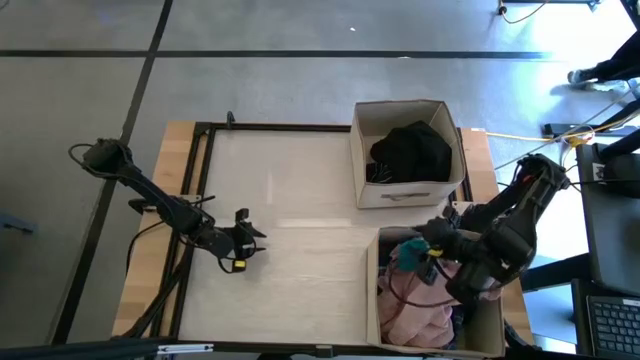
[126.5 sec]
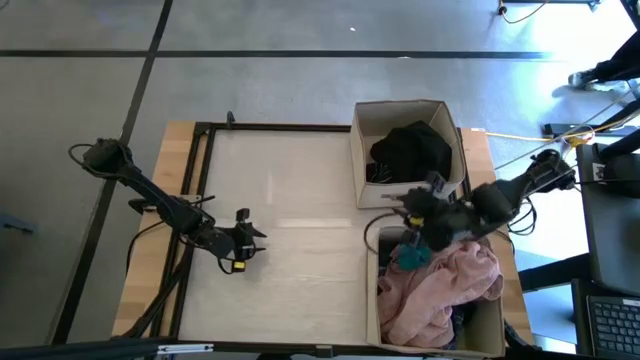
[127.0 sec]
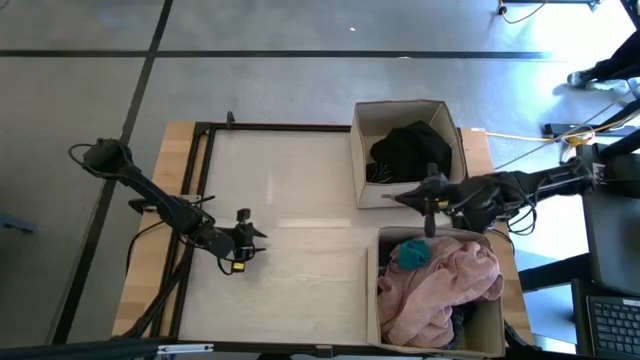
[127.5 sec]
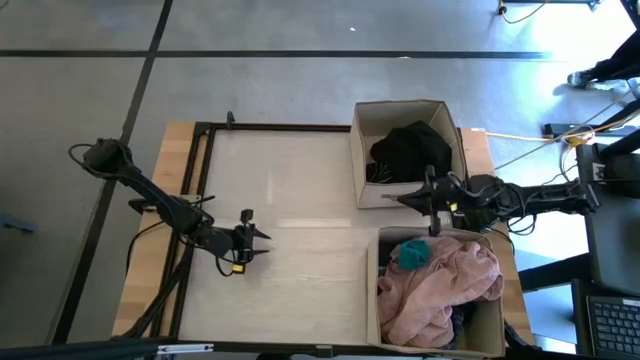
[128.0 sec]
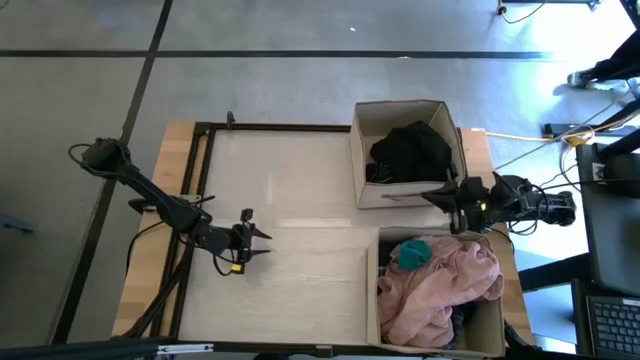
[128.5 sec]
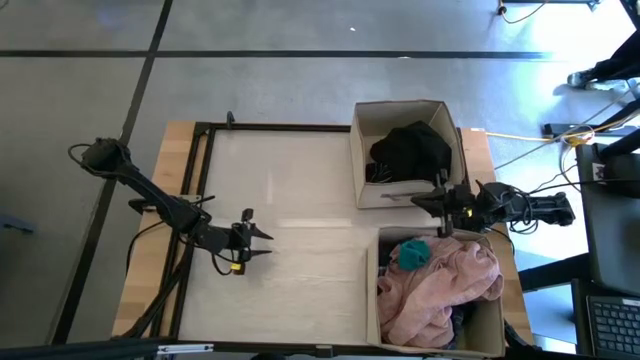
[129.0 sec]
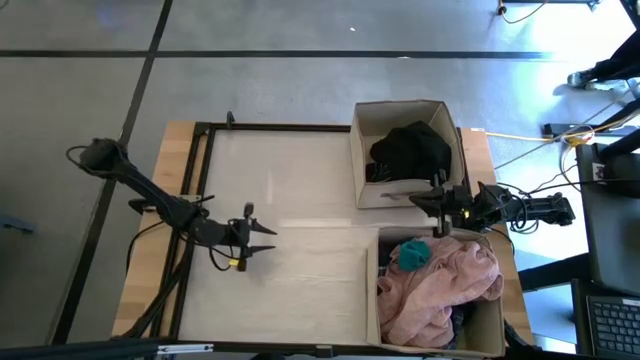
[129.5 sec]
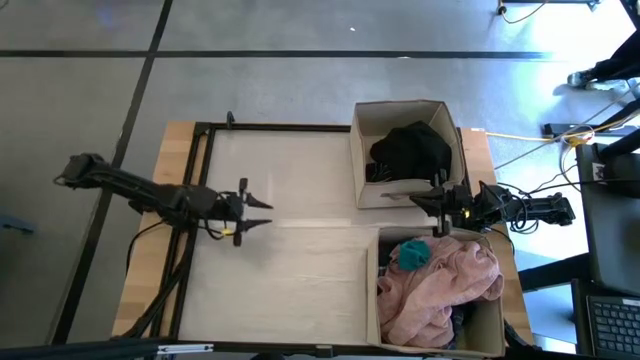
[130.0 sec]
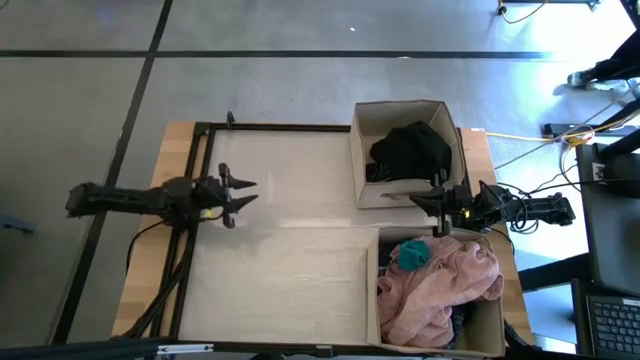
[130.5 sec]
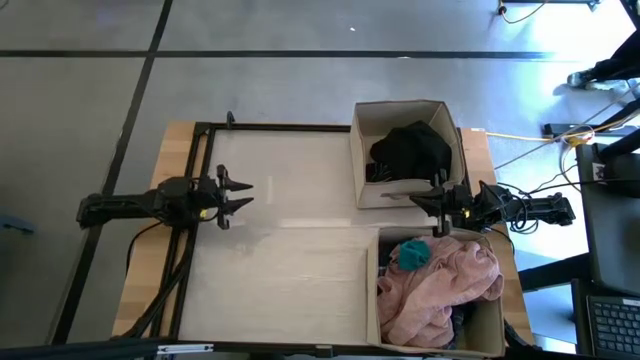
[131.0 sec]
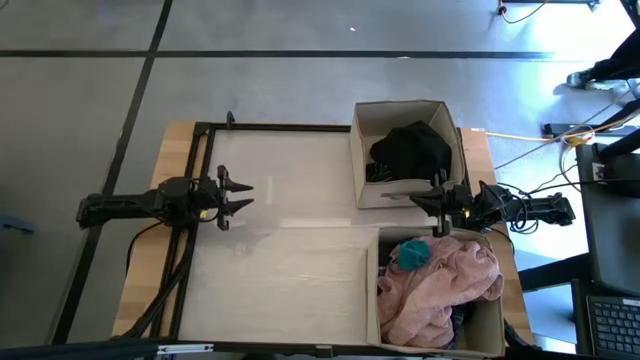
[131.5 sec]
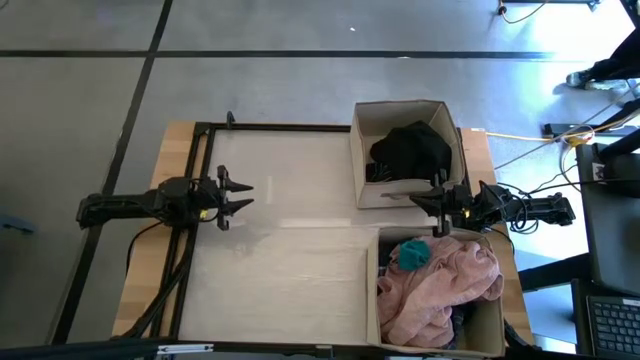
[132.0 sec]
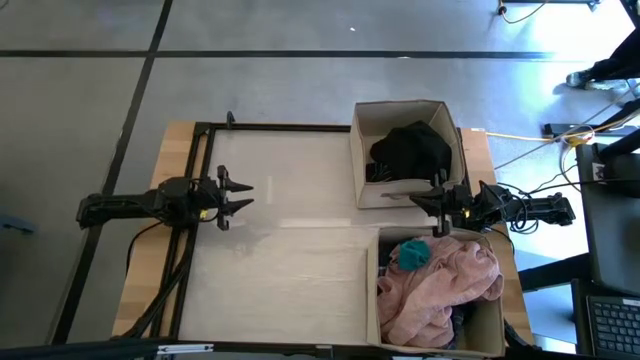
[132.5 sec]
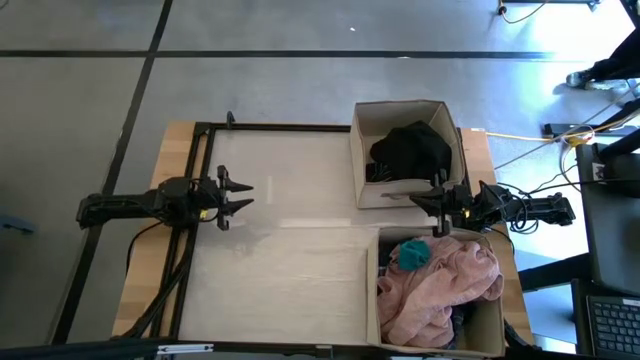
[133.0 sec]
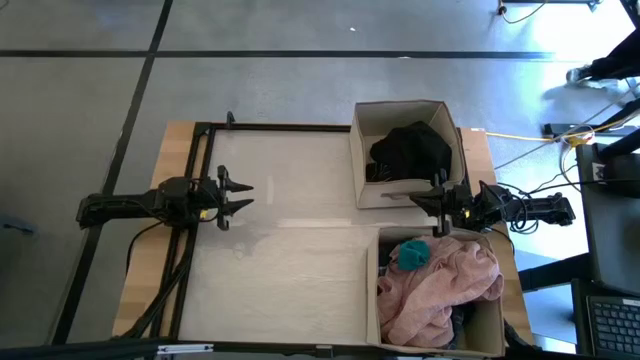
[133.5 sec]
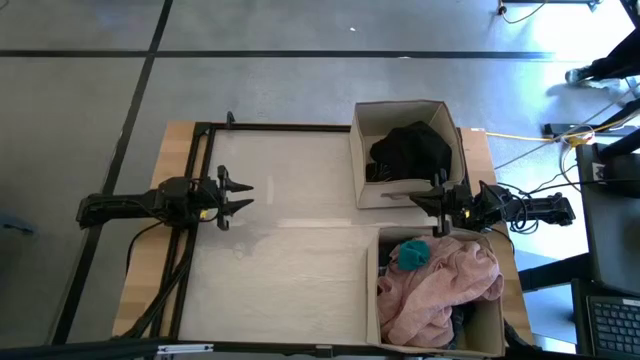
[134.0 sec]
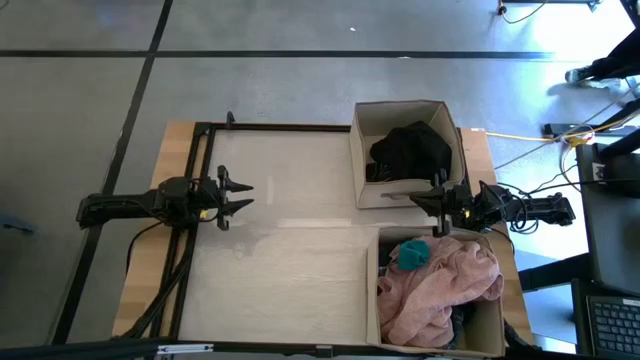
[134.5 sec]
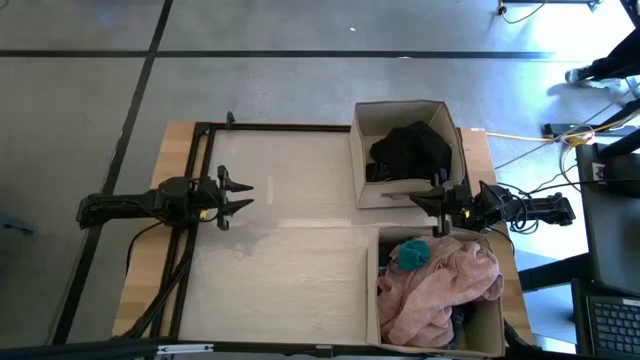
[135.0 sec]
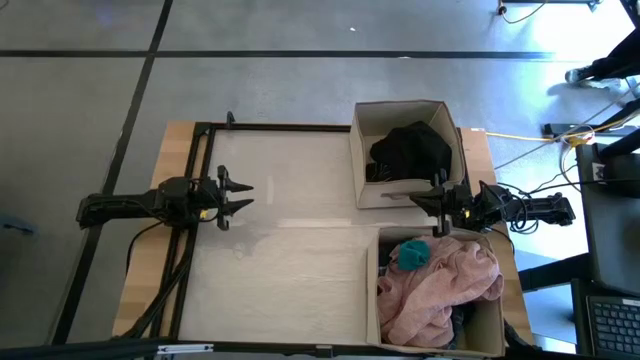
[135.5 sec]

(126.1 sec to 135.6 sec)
Task: Sort clothes
Return to Home Position

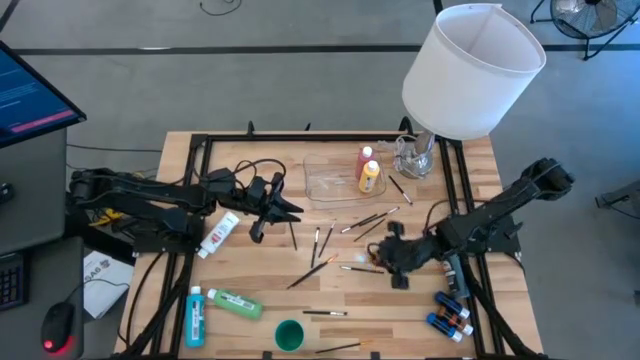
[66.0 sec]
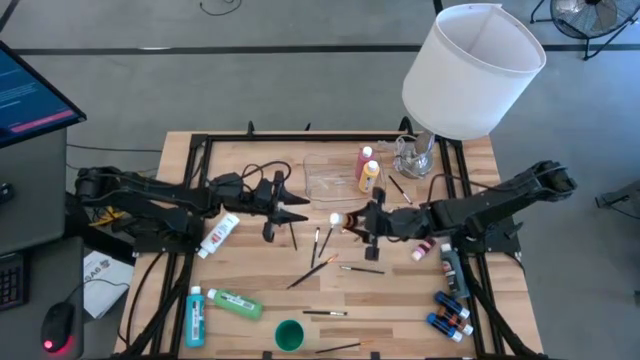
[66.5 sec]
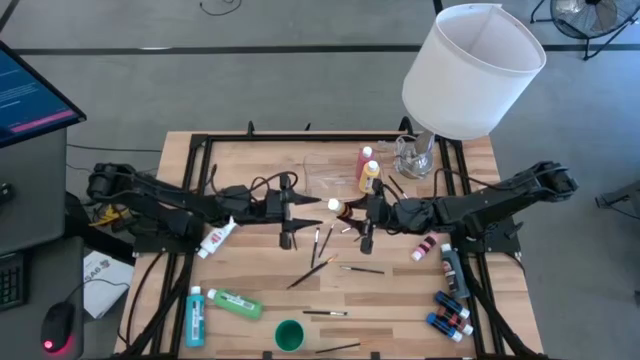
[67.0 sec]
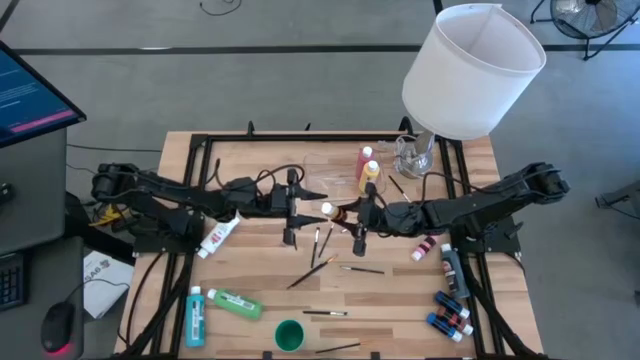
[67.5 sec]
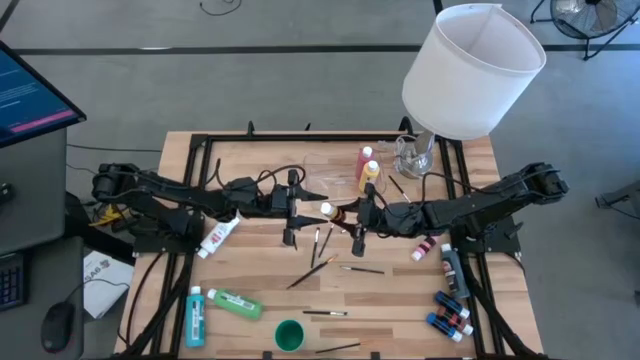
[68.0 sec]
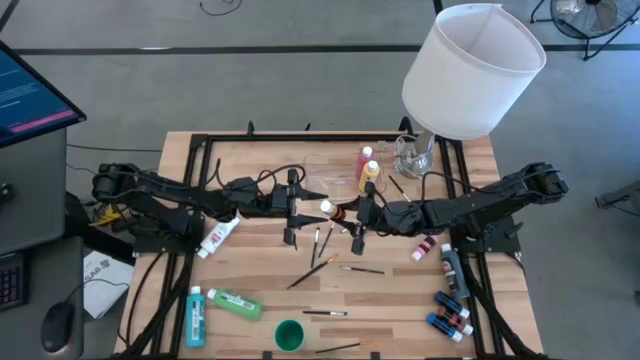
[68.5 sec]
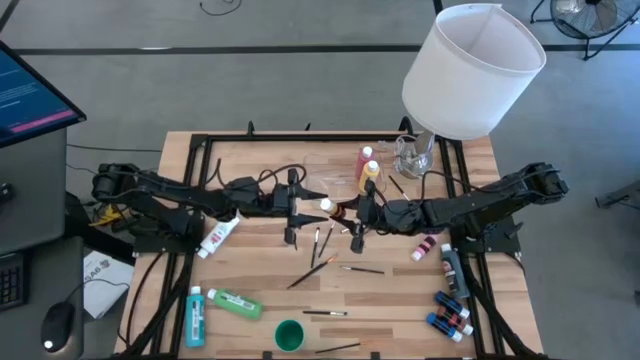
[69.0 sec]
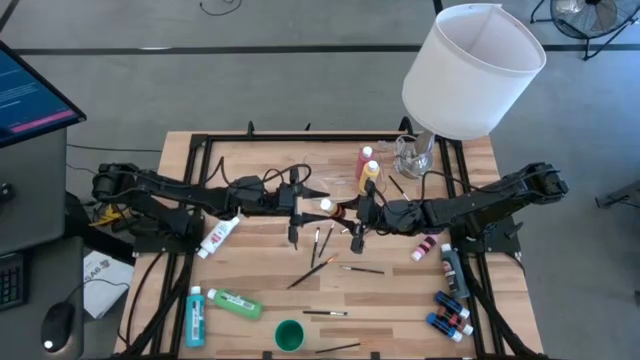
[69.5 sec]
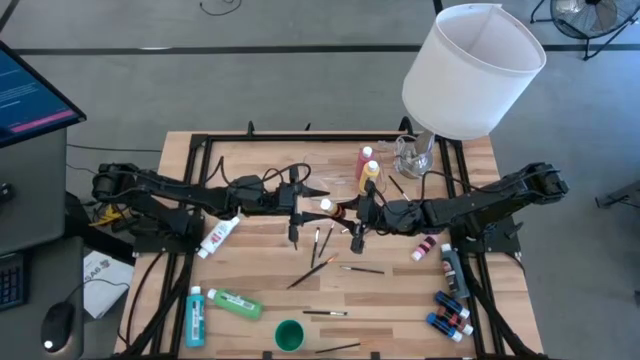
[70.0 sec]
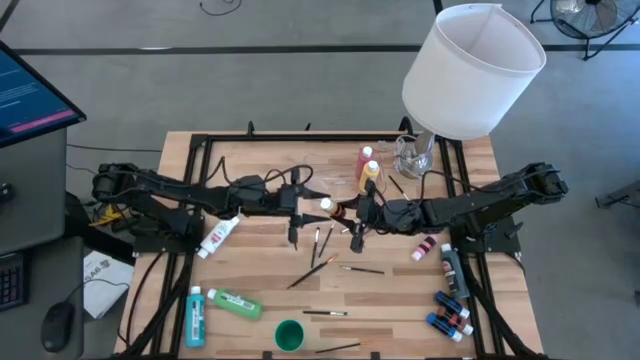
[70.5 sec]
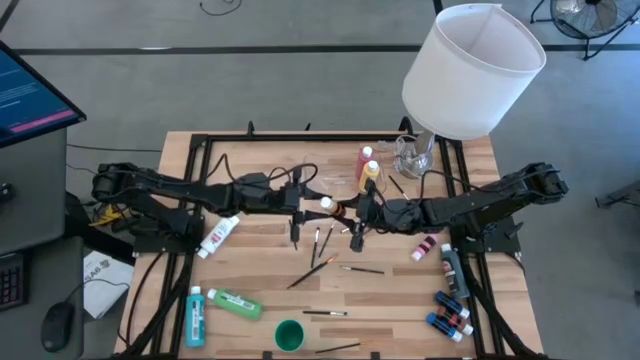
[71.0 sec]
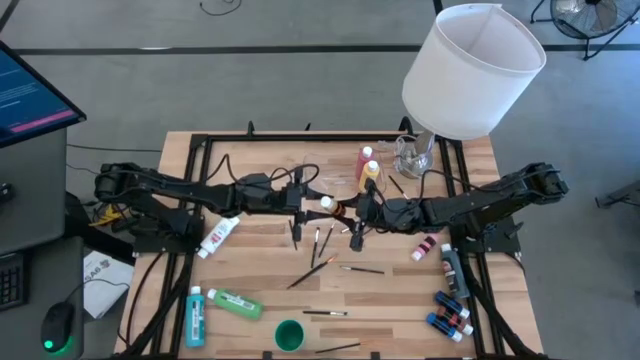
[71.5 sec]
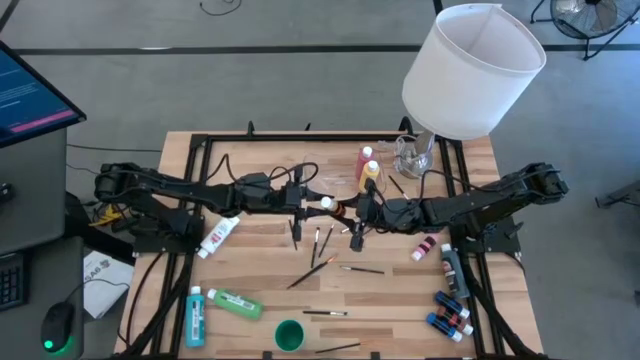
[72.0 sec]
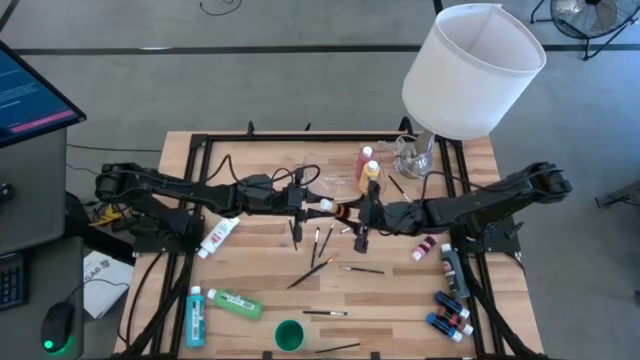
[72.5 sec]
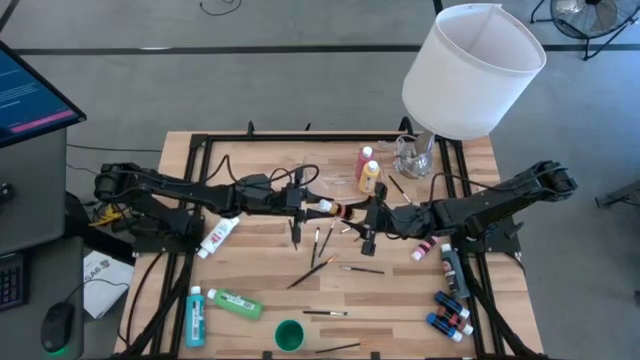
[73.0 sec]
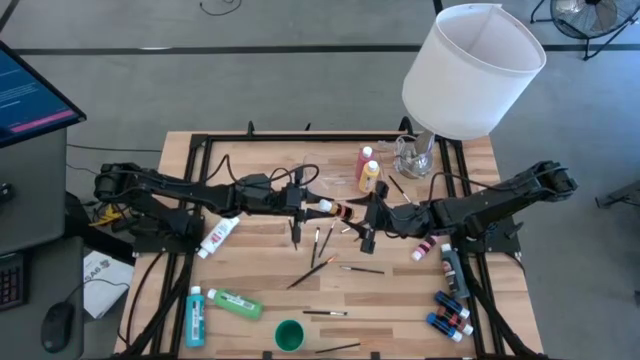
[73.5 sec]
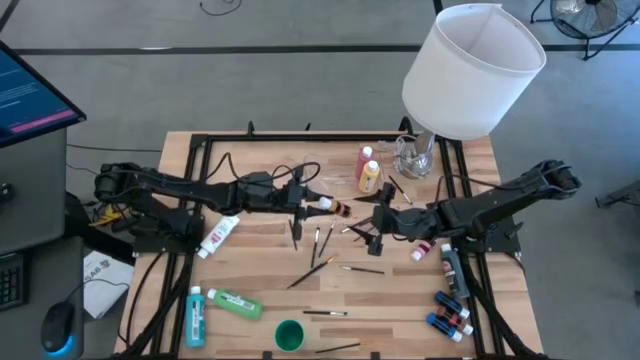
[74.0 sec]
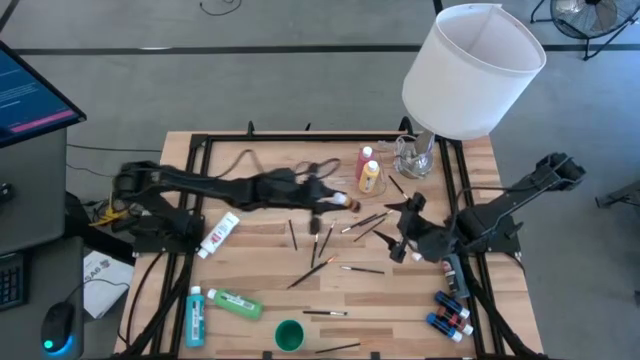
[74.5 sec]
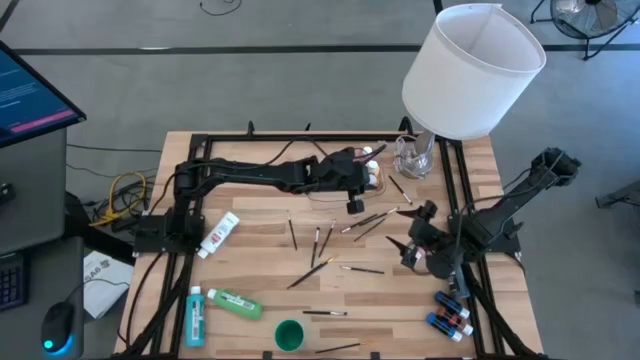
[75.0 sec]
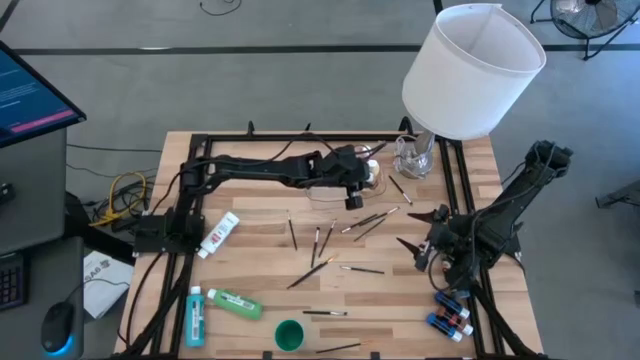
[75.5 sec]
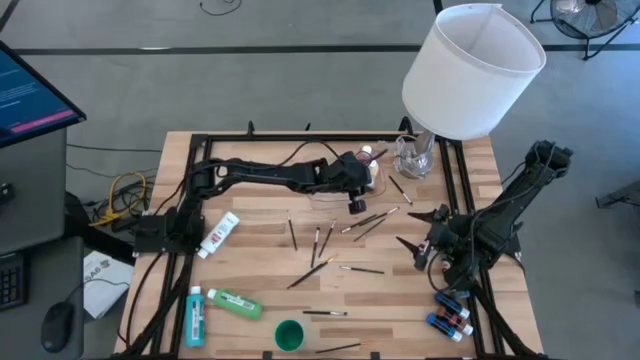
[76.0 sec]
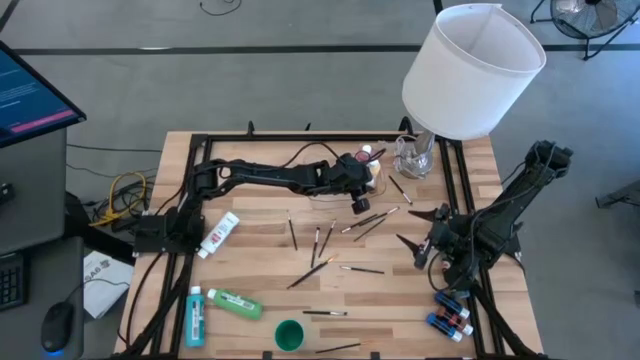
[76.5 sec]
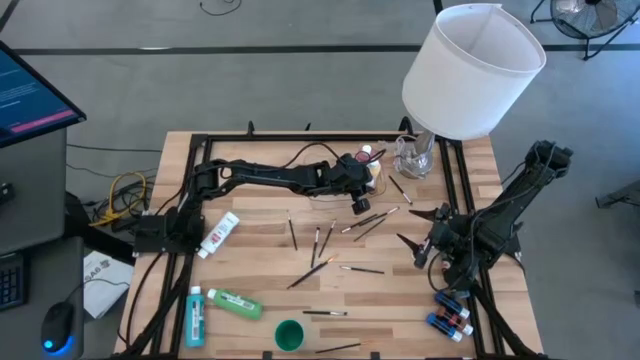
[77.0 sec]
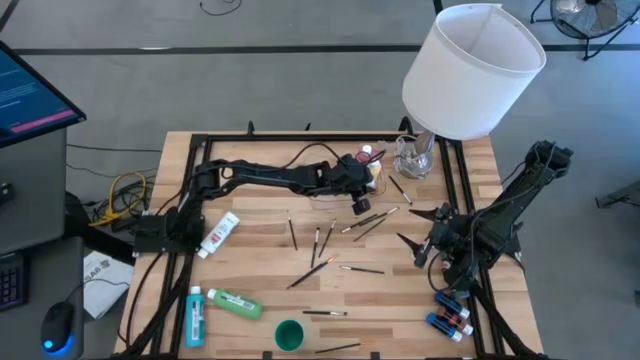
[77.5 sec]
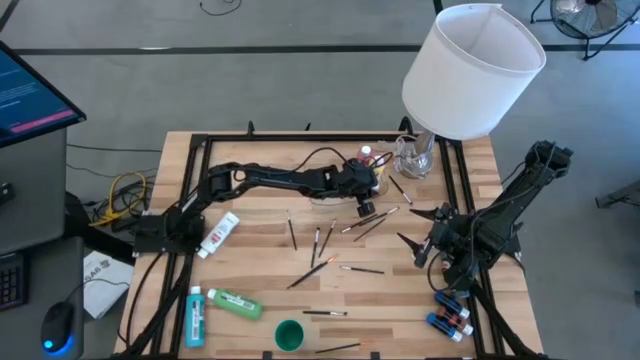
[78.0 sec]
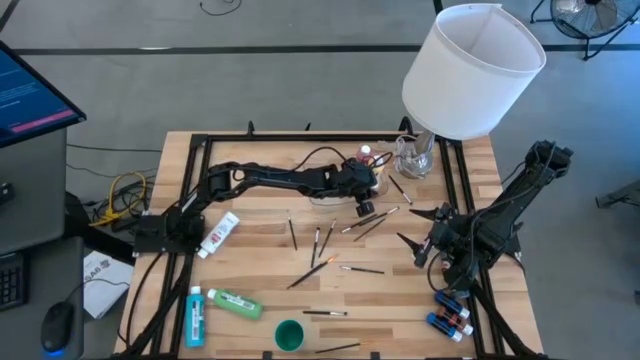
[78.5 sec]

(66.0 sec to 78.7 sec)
Task: Pick & Place Paint Supplies
Put the small yellow paint bottle into the transparent bin
